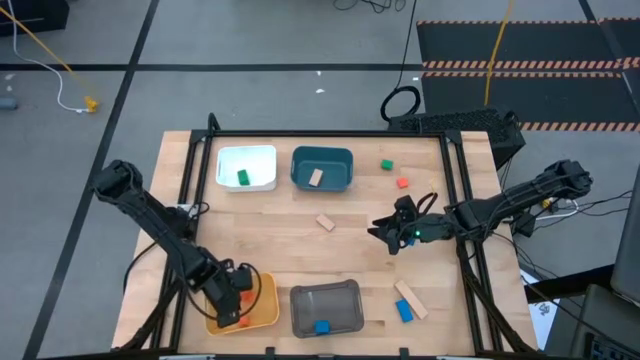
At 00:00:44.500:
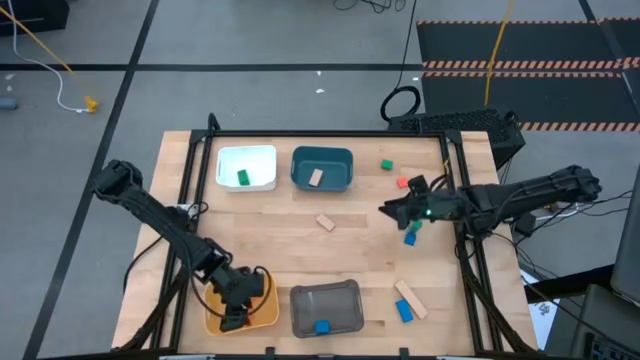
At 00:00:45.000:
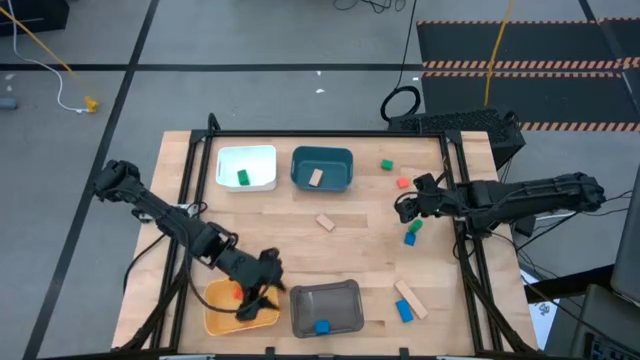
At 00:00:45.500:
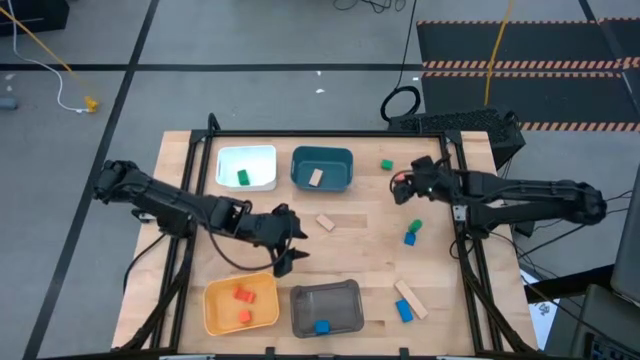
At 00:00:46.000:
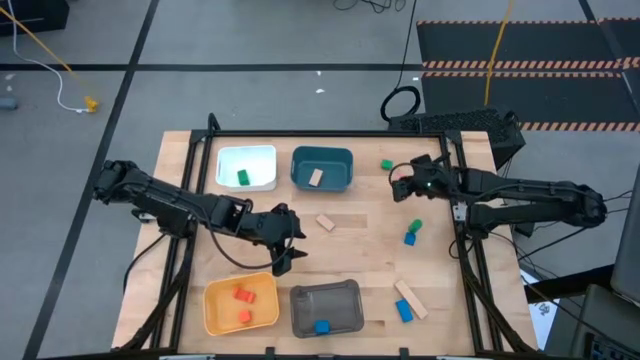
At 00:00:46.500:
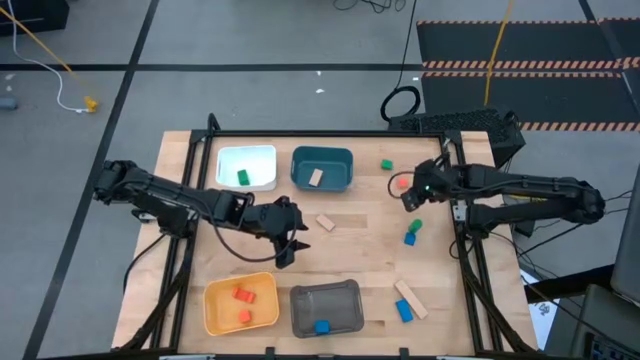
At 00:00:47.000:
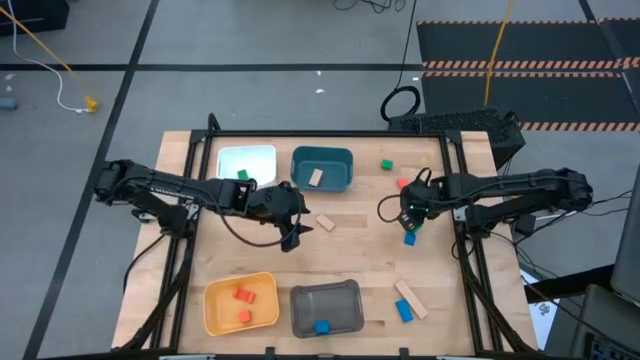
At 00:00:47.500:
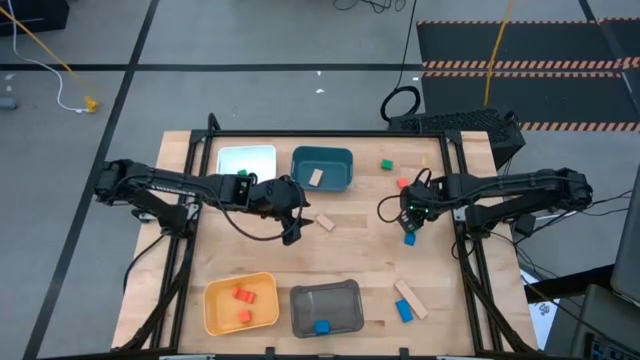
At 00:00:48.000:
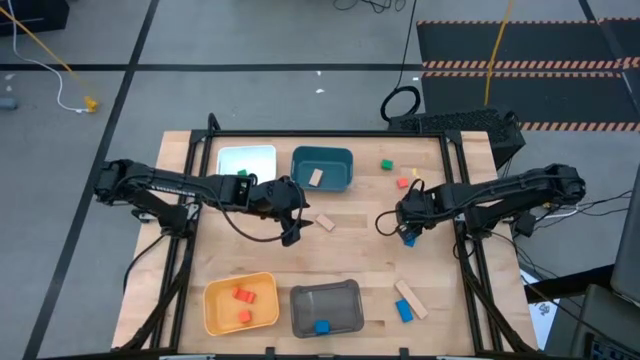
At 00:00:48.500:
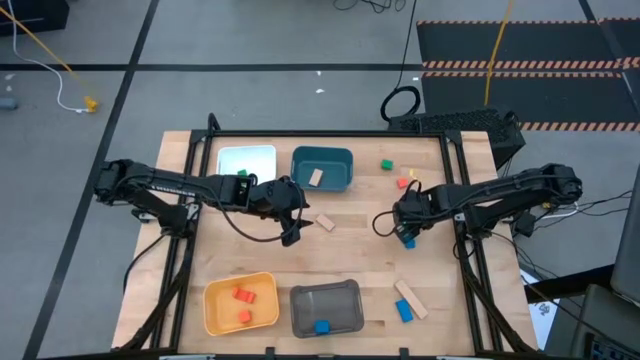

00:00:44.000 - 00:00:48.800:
Task: Sort & place blocks by color
Put the bottom green block into the white bin

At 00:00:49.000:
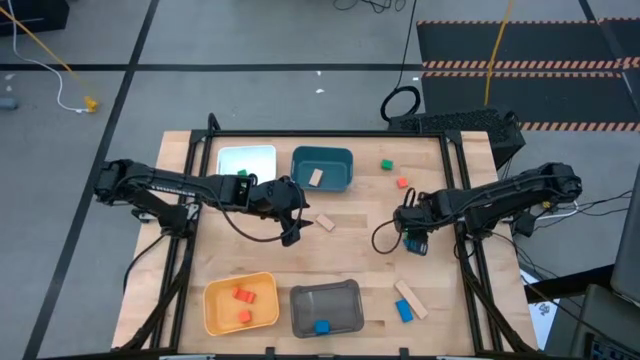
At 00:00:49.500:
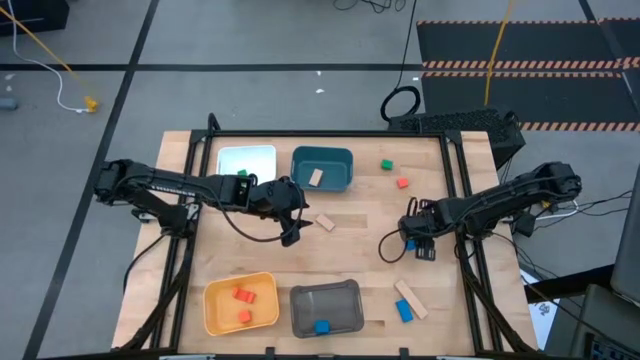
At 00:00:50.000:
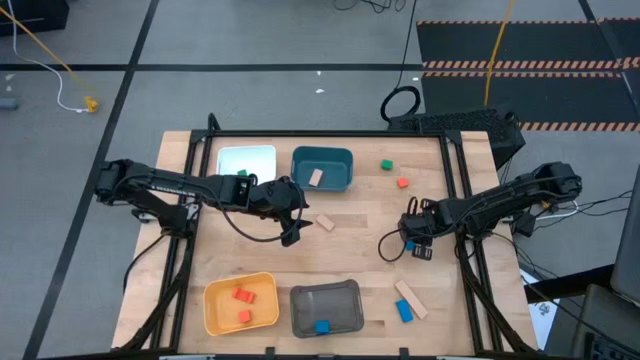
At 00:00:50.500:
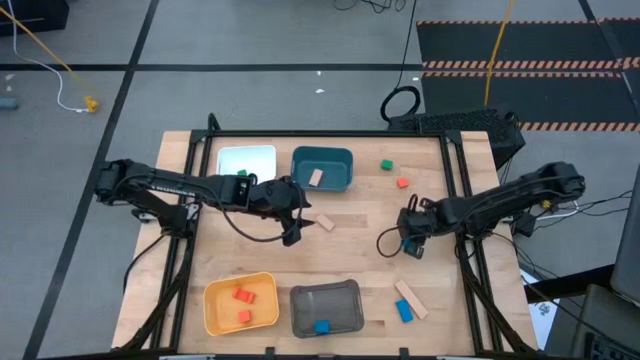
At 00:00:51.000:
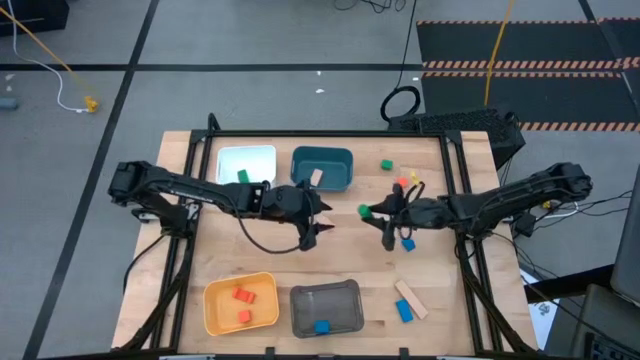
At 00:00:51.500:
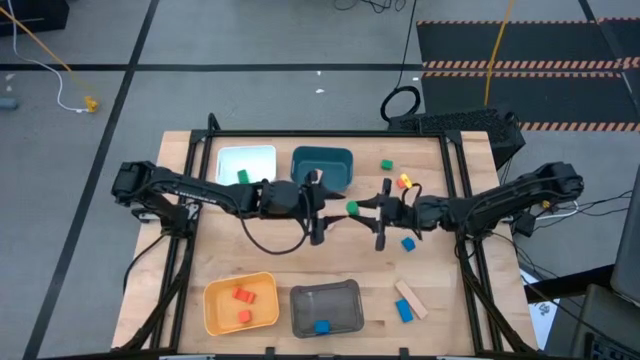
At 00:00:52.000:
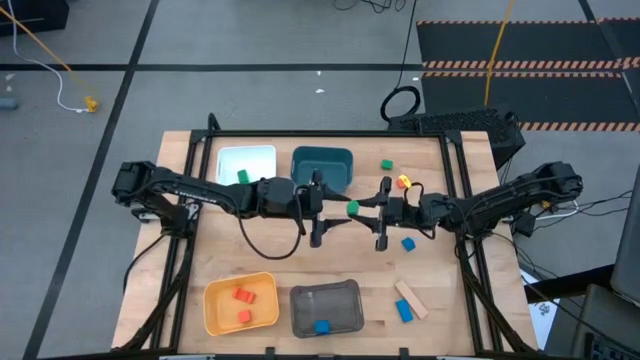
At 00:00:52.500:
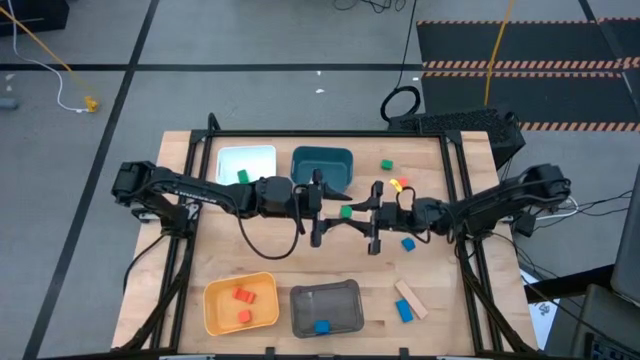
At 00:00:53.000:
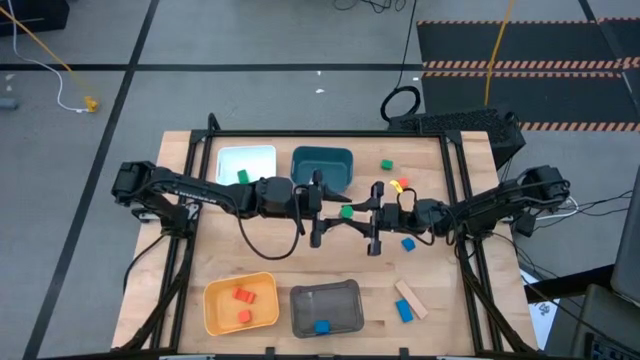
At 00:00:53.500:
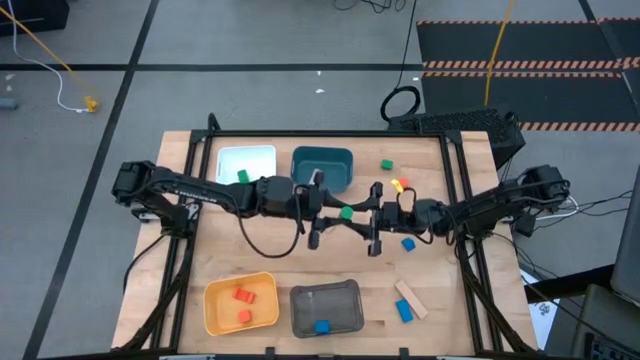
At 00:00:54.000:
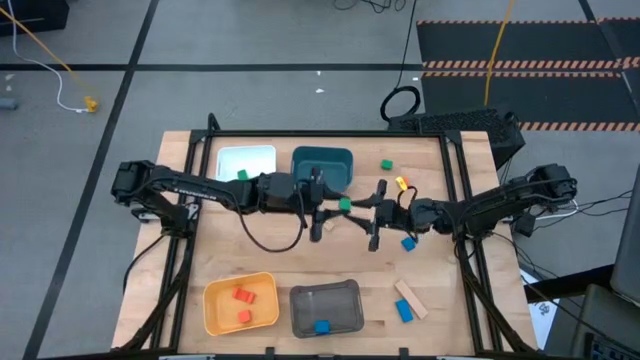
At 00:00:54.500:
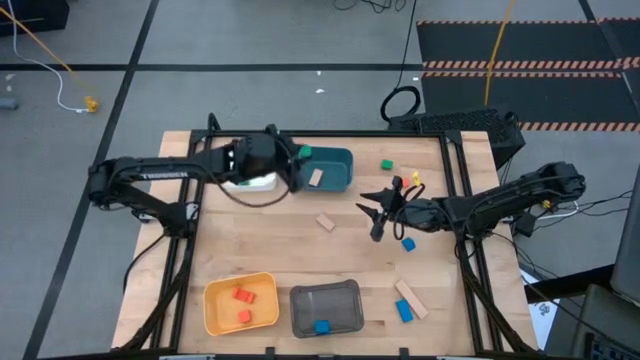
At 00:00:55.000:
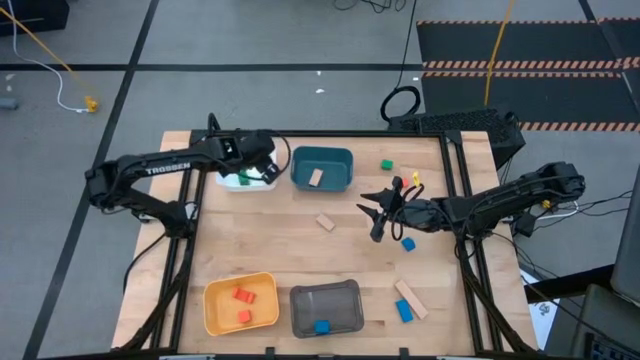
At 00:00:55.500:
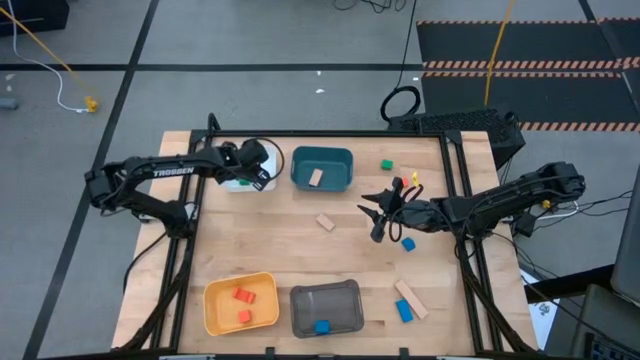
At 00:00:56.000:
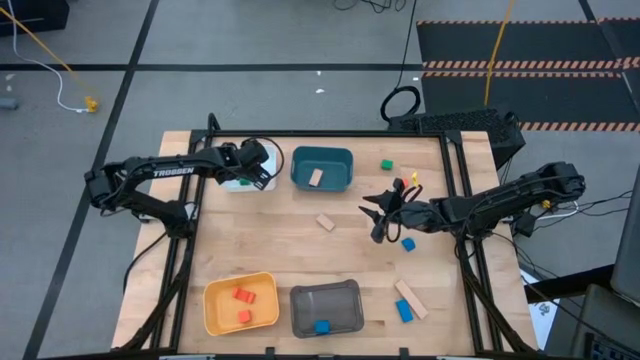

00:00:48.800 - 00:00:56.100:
Put the bottom green block into the white bin

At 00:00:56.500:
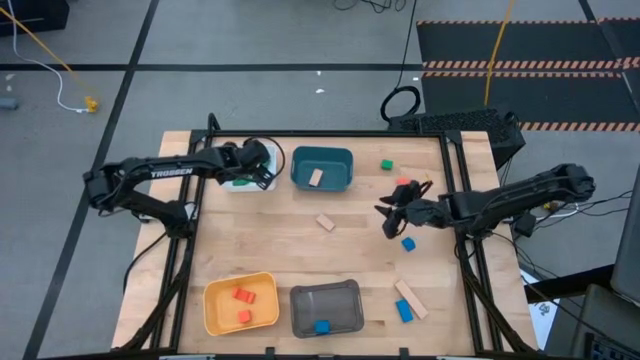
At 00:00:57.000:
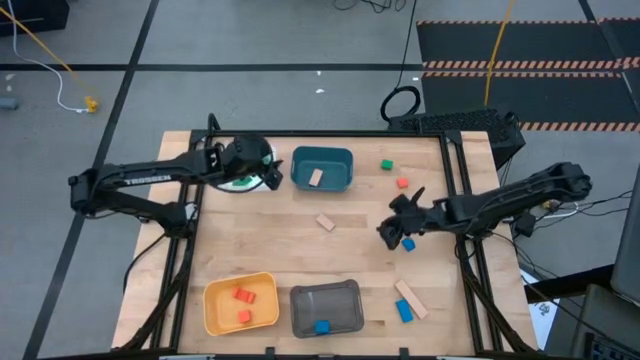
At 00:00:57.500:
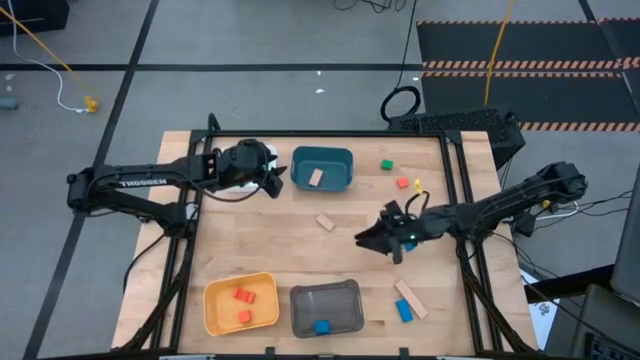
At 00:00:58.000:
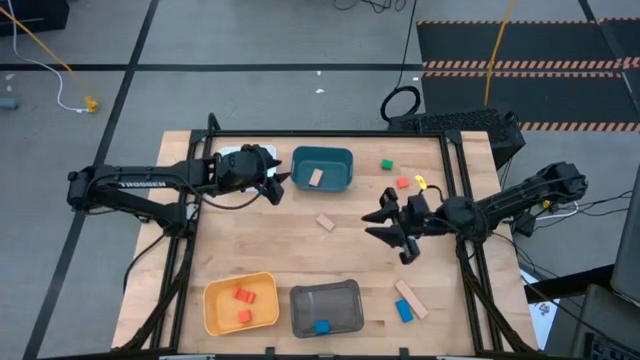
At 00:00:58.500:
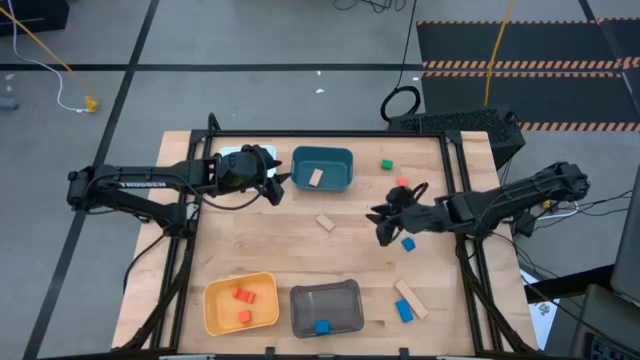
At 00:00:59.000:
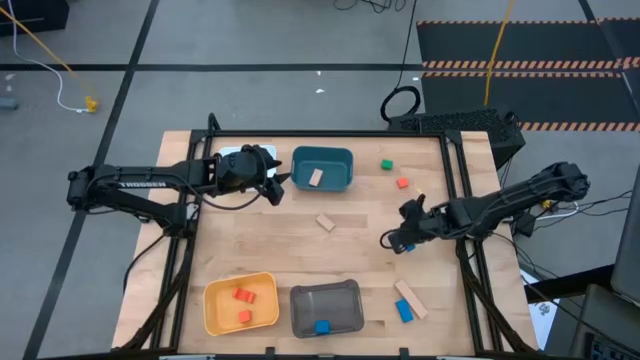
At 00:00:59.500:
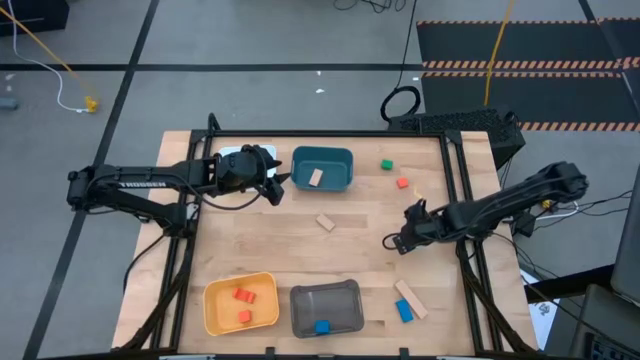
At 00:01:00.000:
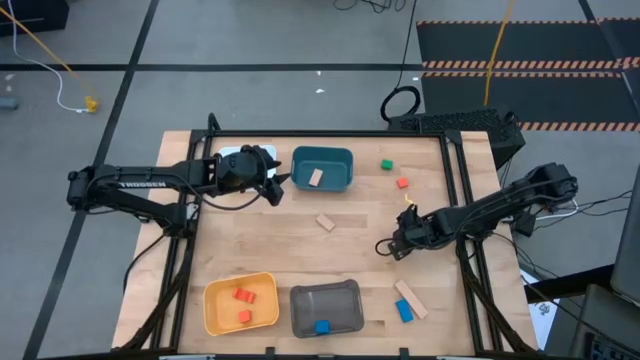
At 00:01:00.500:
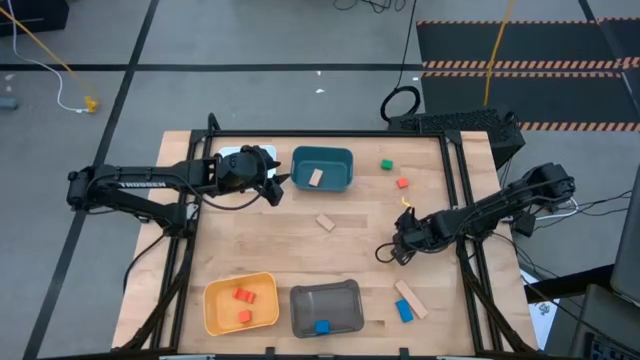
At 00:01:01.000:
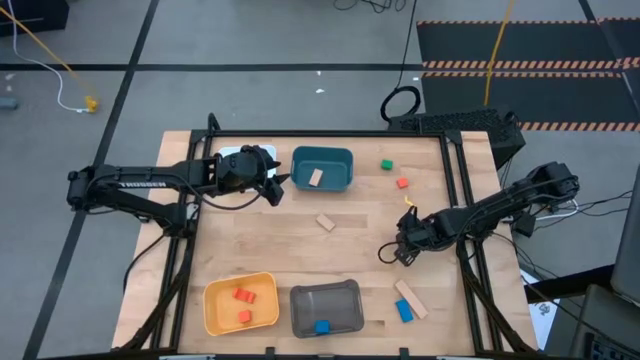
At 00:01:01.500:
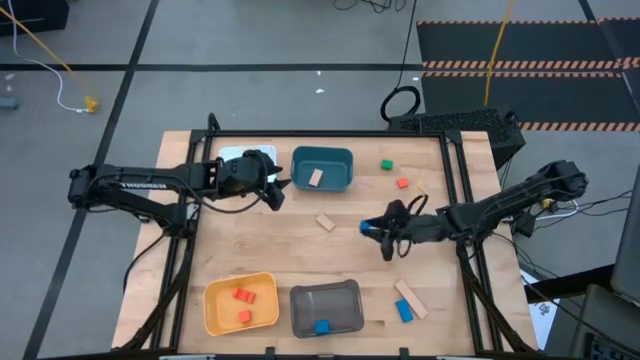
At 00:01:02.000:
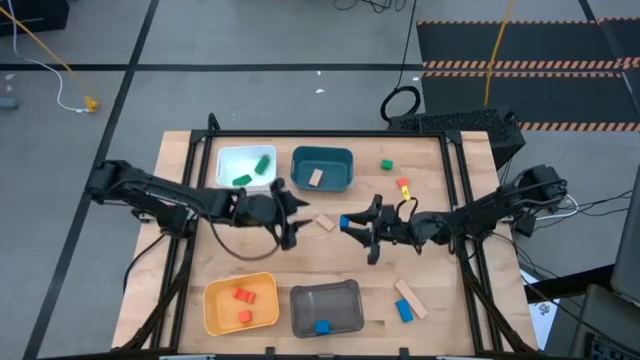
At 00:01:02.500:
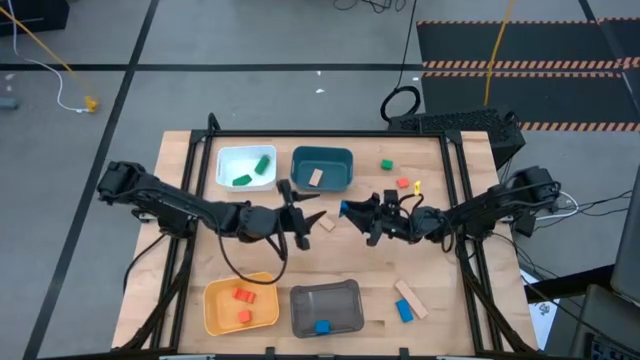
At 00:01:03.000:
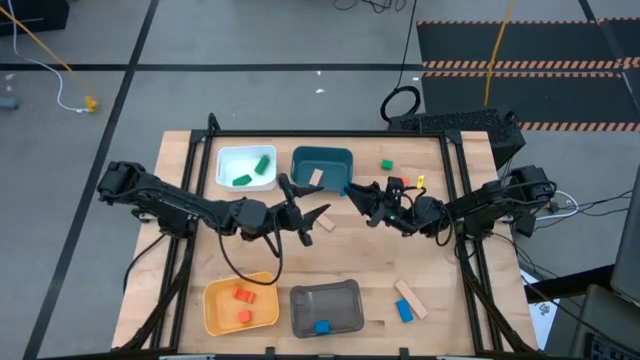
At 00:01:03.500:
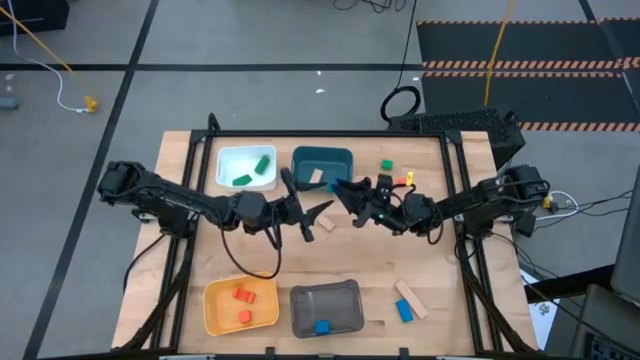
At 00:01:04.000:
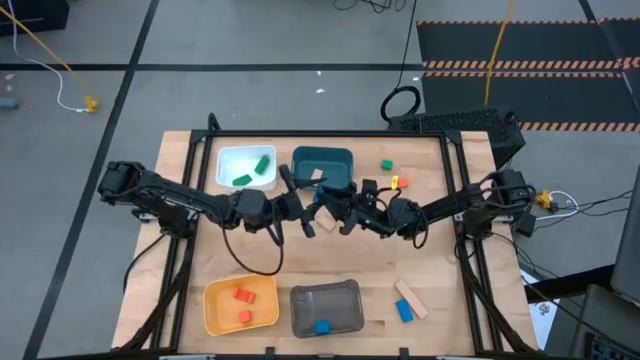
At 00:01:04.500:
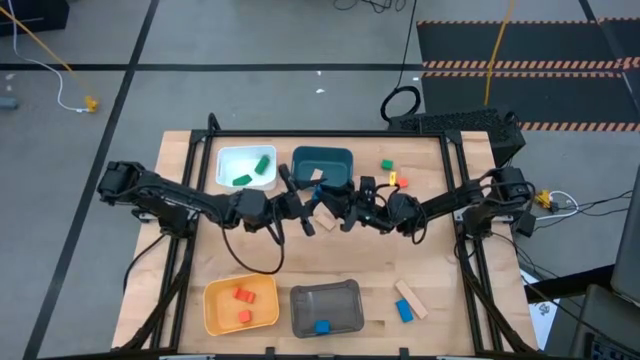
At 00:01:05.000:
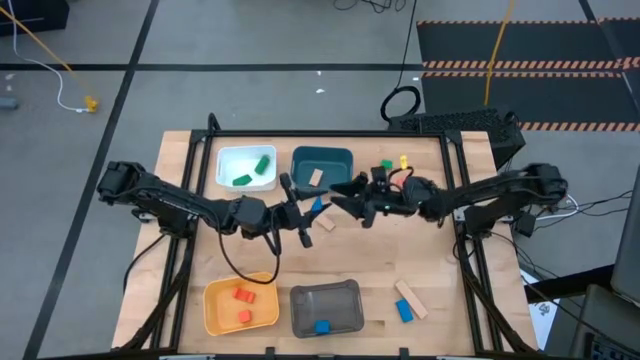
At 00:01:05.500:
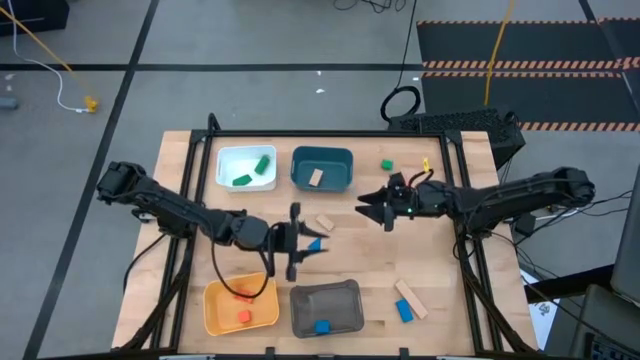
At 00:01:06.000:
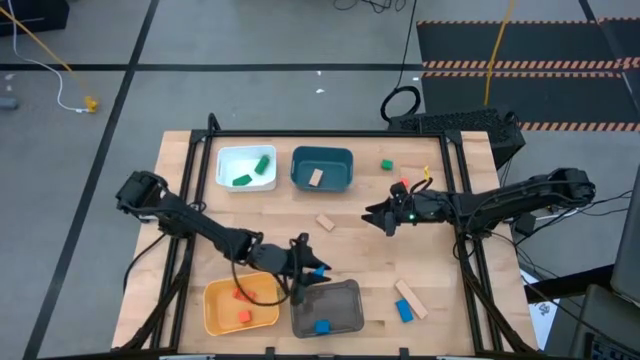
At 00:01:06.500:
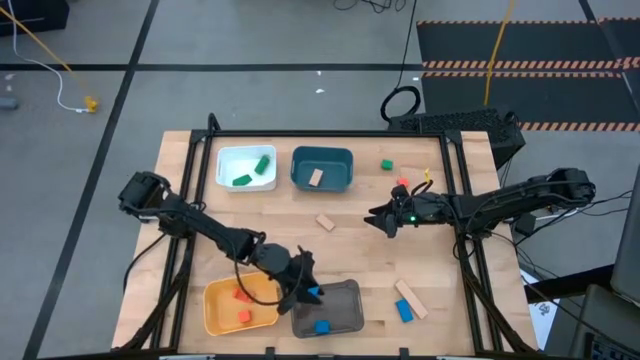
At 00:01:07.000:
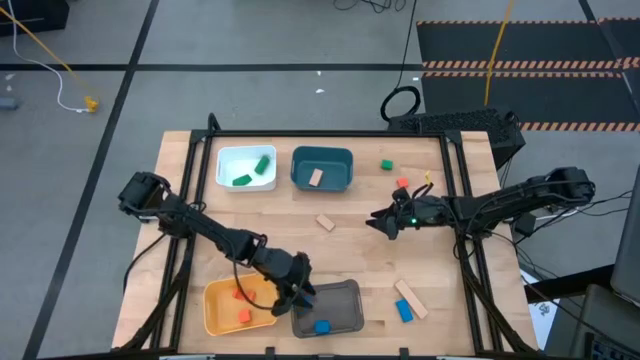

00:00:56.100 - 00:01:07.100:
Put the top blue block into the black bin
